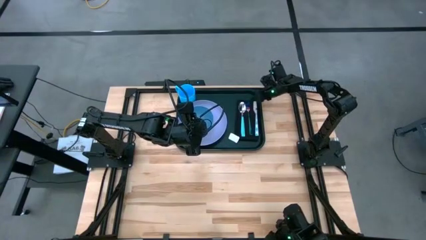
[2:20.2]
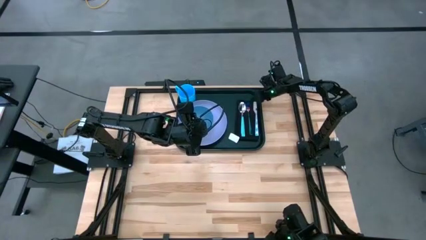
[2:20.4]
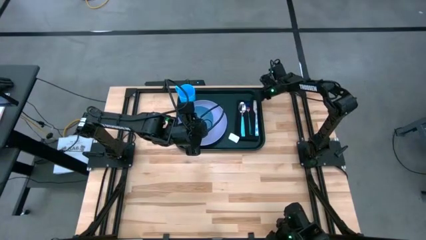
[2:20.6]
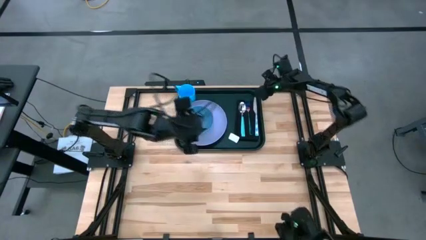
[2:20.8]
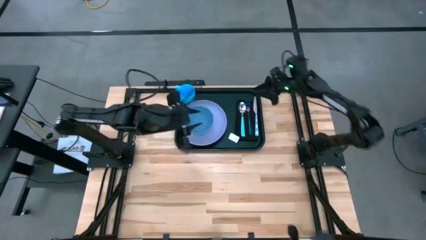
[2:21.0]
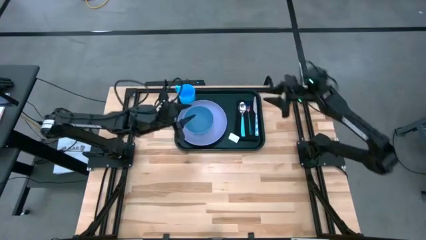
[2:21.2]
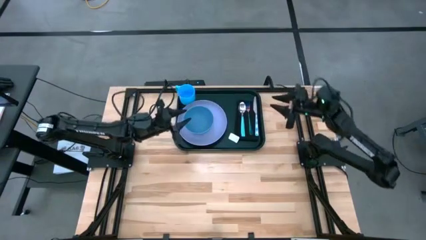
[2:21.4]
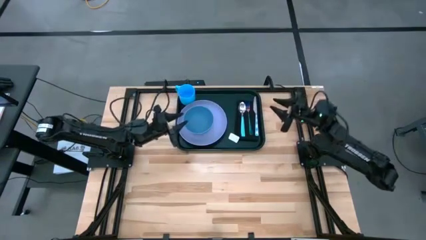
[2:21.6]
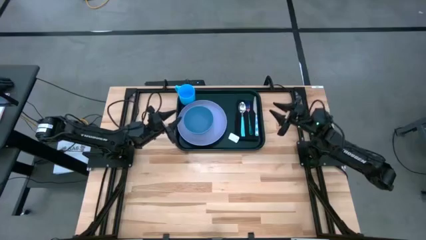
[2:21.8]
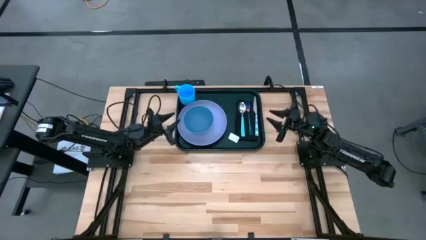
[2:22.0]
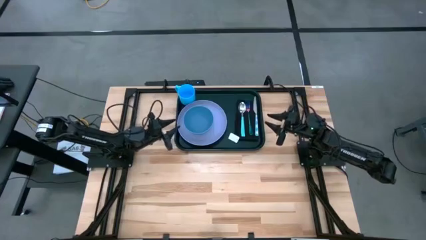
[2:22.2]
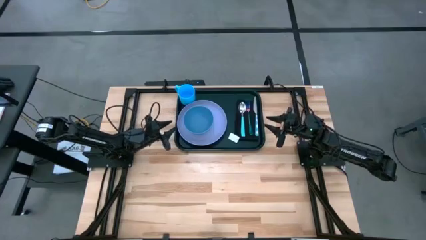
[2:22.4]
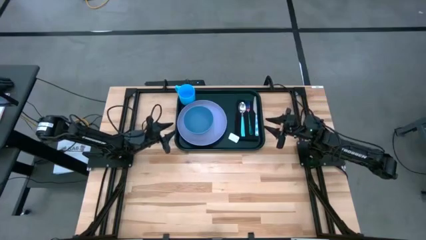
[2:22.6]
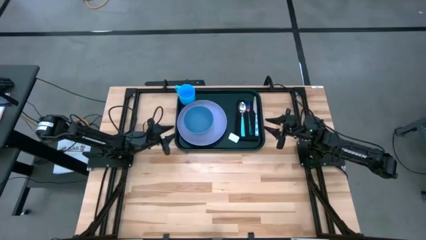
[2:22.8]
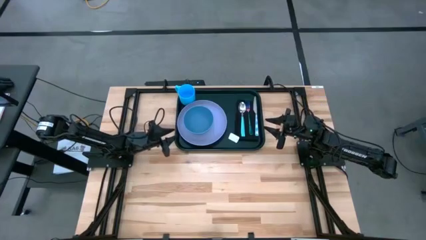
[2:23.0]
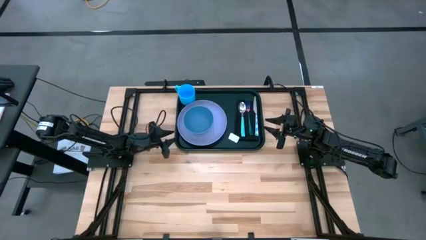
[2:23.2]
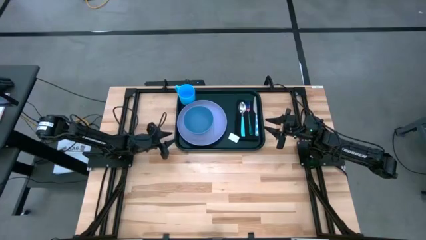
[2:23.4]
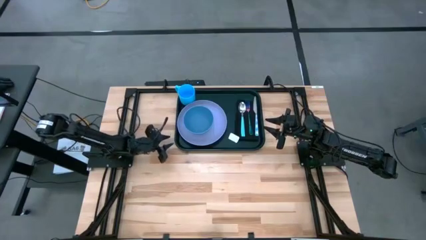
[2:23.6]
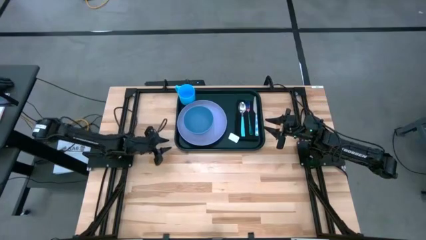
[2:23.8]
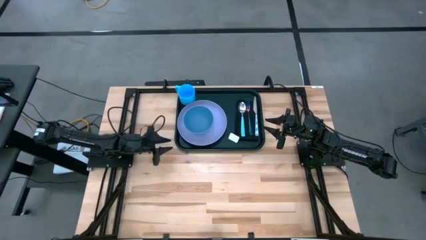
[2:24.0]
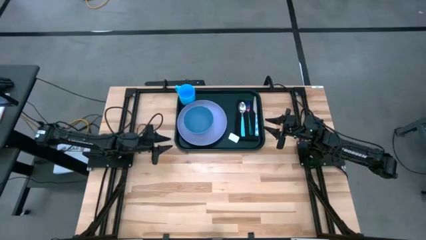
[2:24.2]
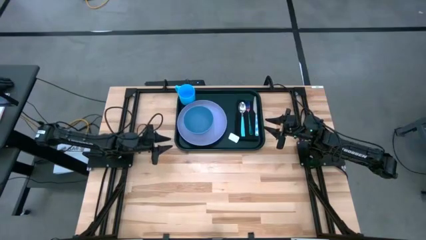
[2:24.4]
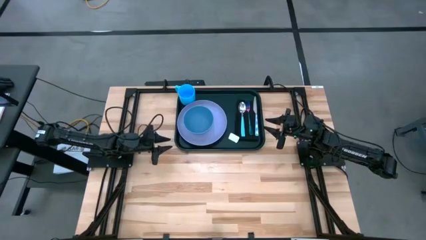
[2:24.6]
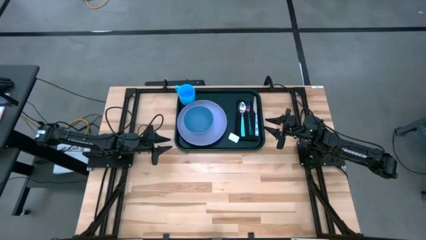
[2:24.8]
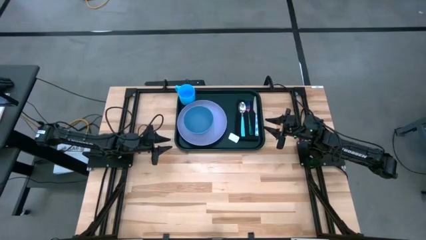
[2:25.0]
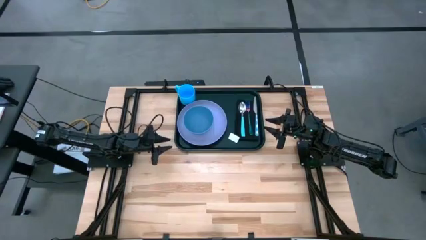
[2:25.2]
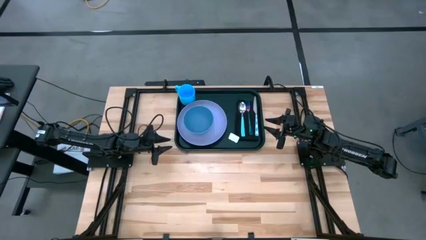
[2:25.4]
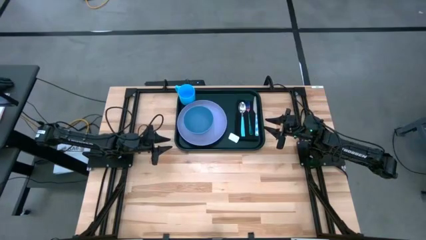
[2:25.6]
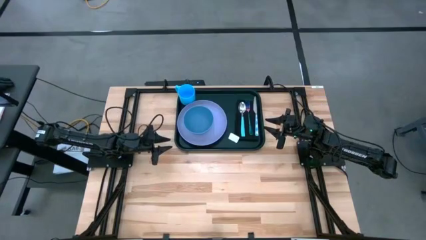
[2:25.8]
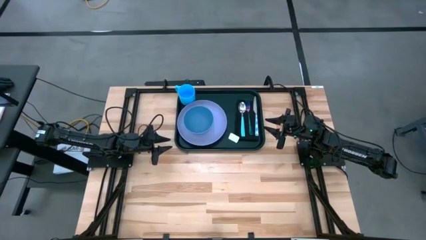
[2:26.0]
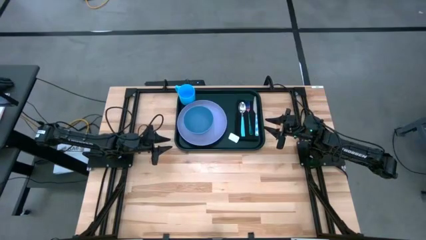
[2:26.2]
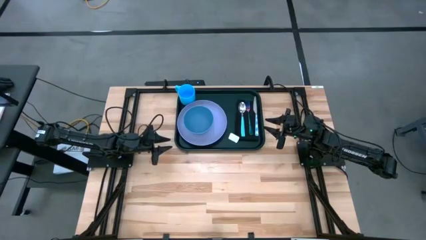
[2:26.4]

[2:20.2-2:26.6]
Task: Set up tray
Return to Home Position

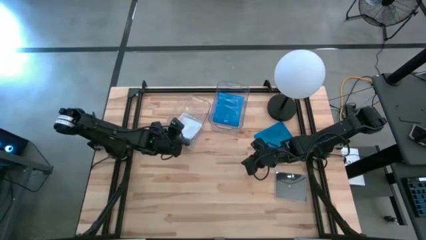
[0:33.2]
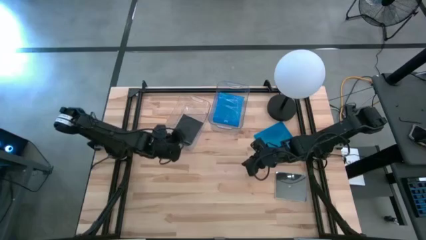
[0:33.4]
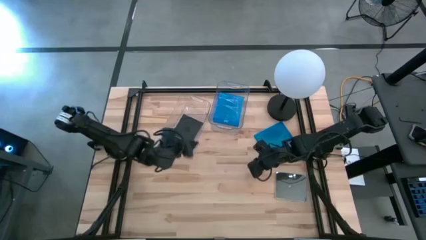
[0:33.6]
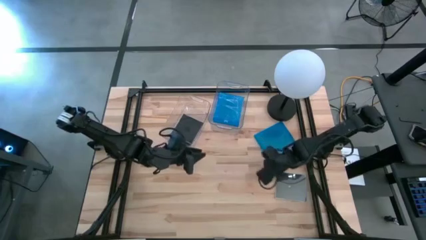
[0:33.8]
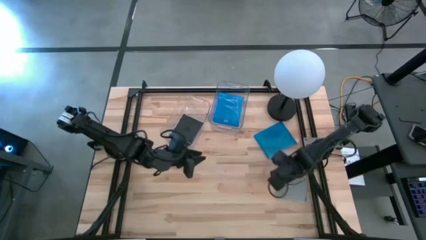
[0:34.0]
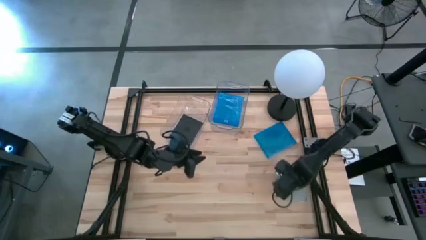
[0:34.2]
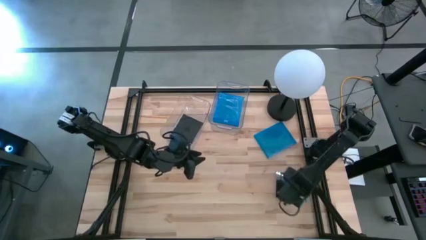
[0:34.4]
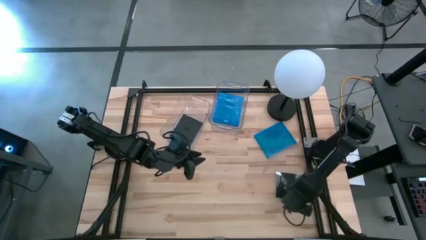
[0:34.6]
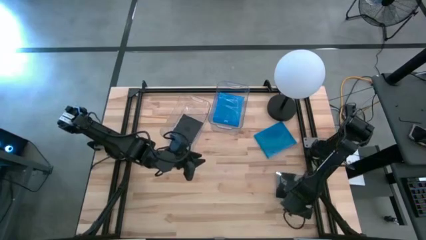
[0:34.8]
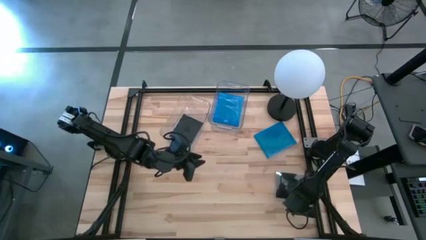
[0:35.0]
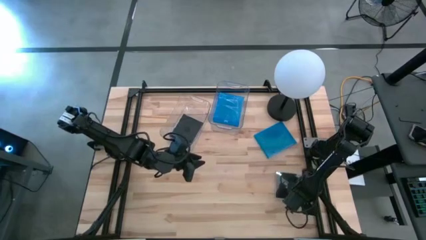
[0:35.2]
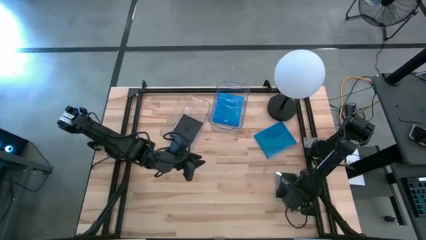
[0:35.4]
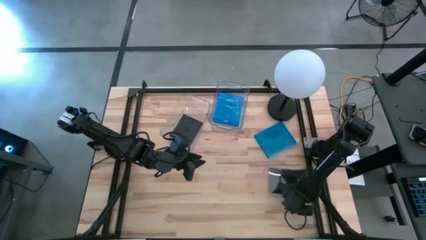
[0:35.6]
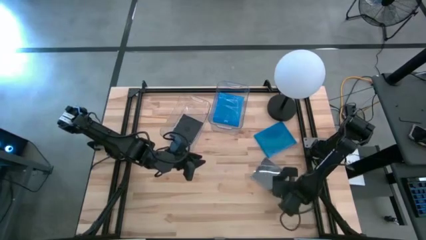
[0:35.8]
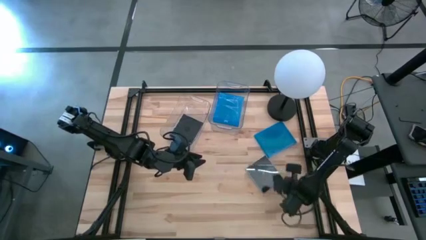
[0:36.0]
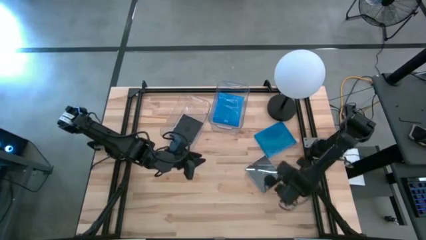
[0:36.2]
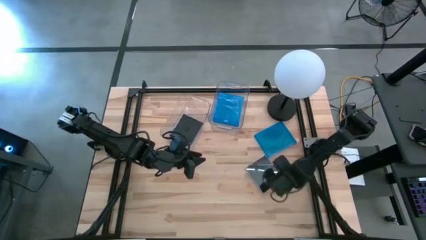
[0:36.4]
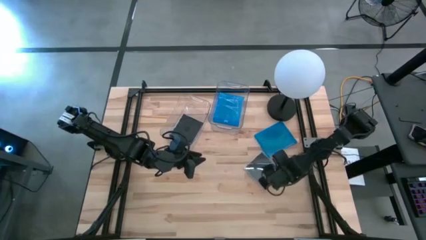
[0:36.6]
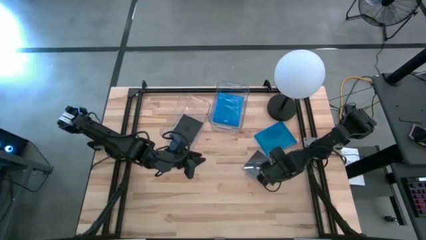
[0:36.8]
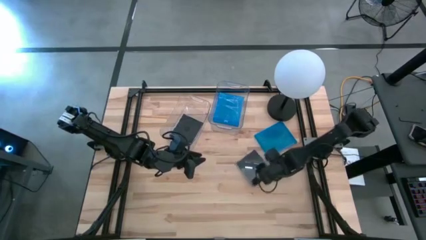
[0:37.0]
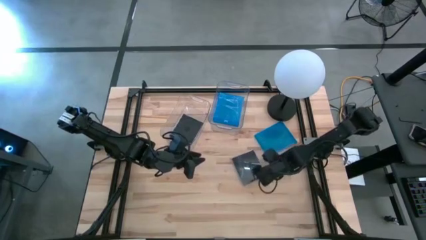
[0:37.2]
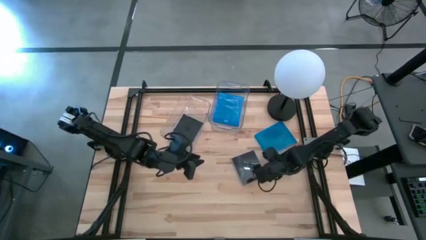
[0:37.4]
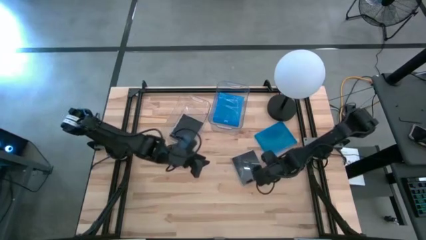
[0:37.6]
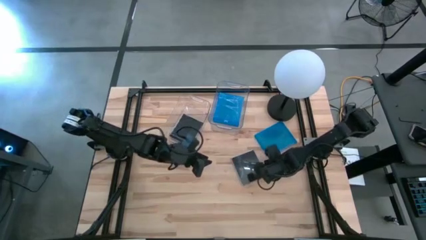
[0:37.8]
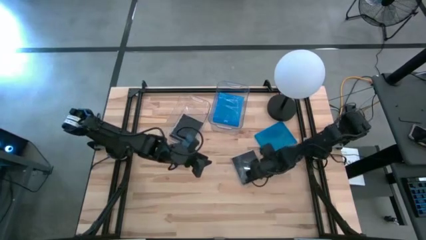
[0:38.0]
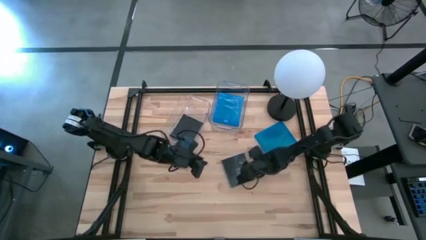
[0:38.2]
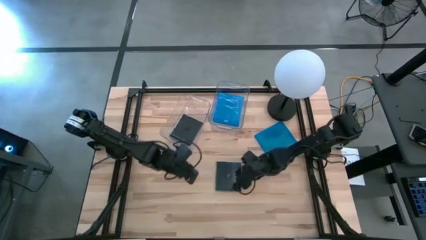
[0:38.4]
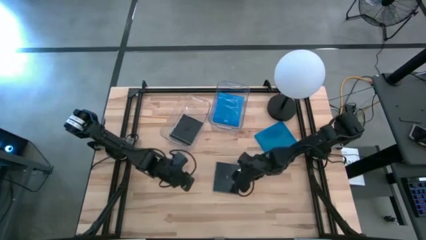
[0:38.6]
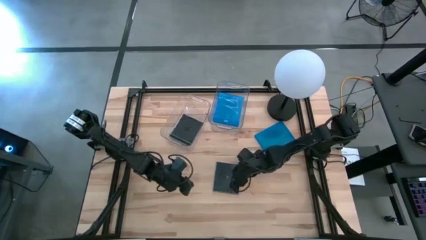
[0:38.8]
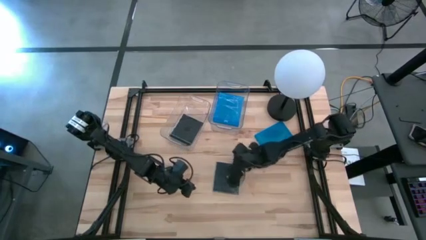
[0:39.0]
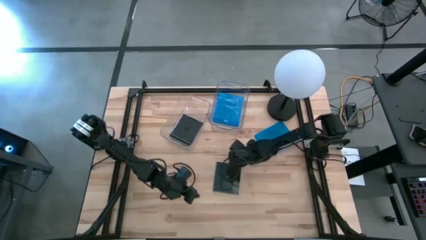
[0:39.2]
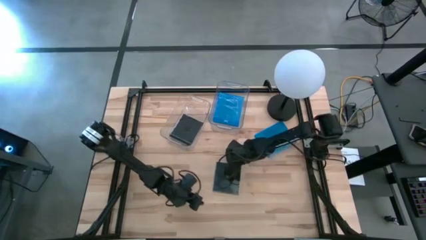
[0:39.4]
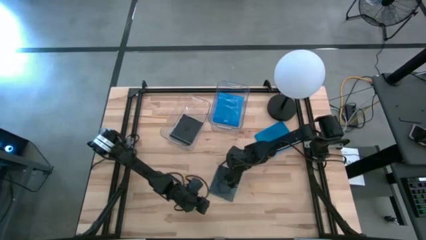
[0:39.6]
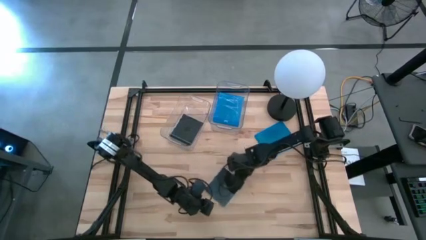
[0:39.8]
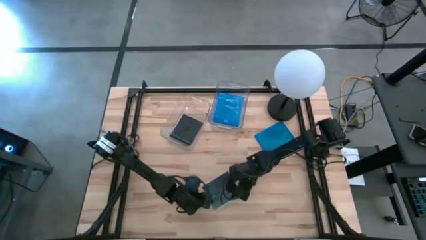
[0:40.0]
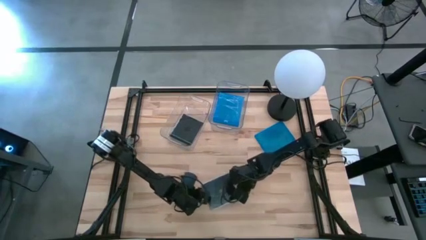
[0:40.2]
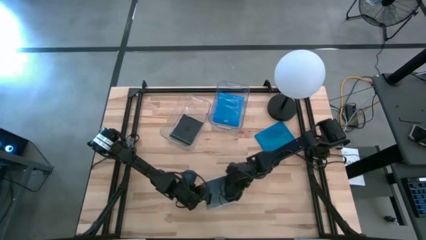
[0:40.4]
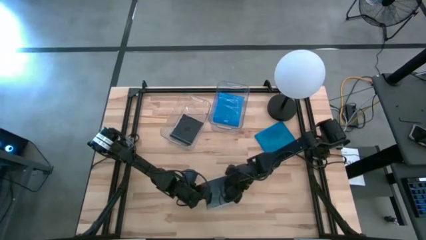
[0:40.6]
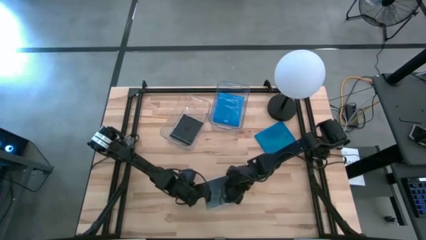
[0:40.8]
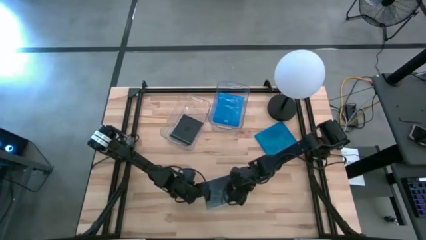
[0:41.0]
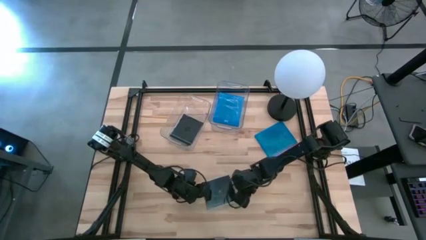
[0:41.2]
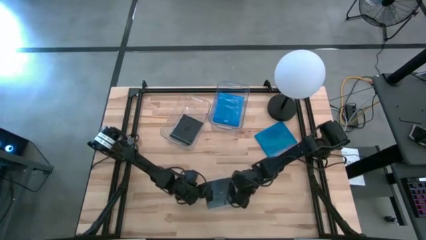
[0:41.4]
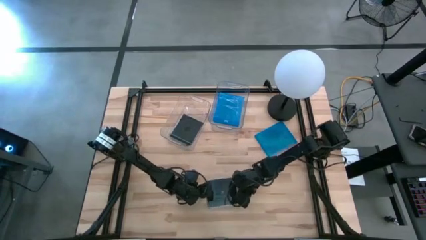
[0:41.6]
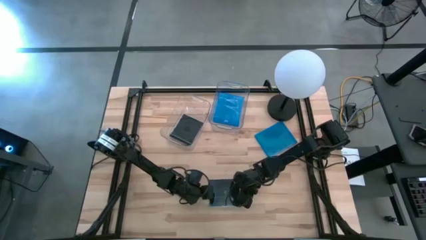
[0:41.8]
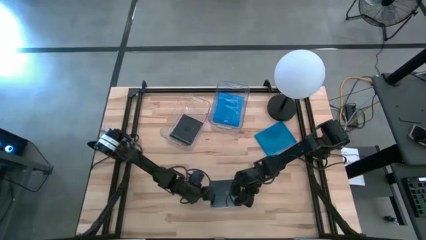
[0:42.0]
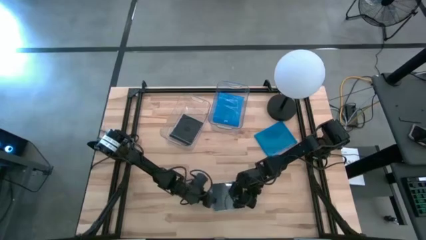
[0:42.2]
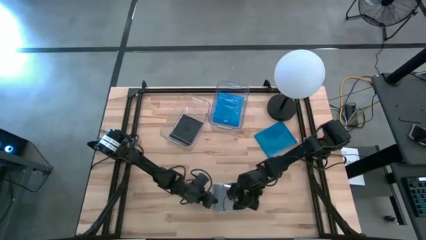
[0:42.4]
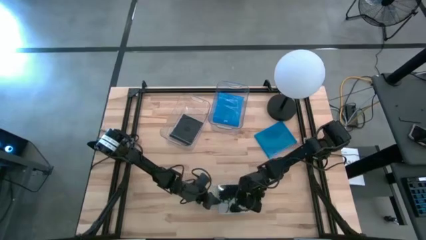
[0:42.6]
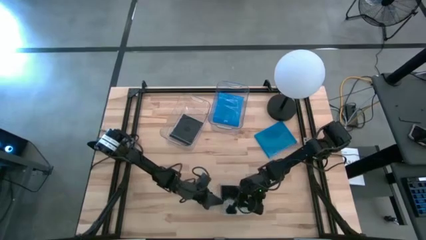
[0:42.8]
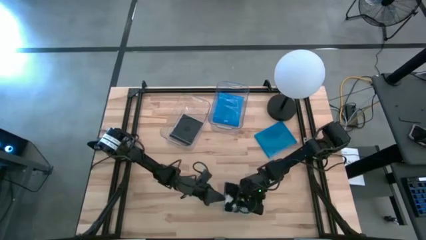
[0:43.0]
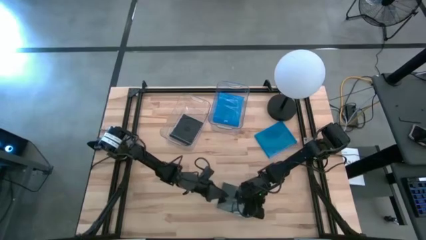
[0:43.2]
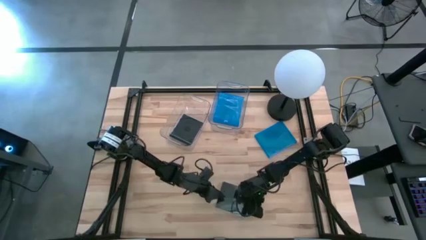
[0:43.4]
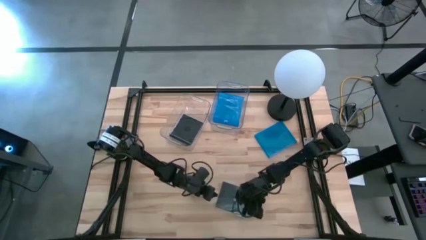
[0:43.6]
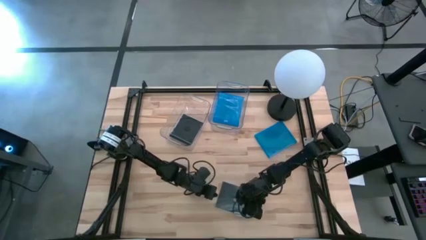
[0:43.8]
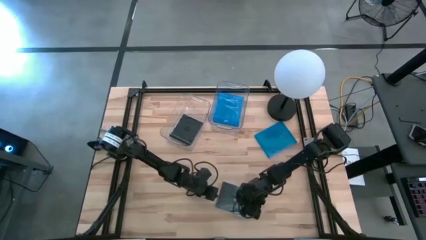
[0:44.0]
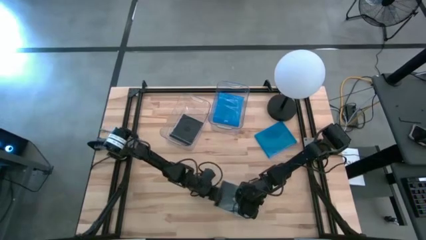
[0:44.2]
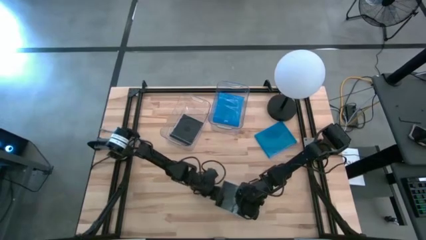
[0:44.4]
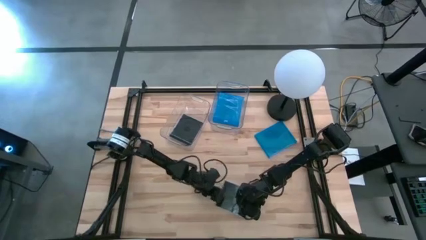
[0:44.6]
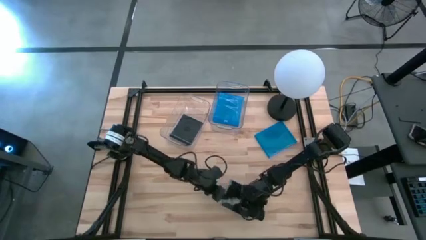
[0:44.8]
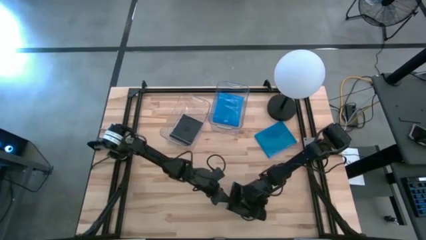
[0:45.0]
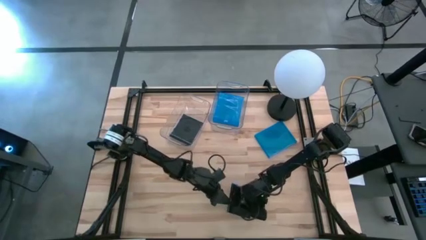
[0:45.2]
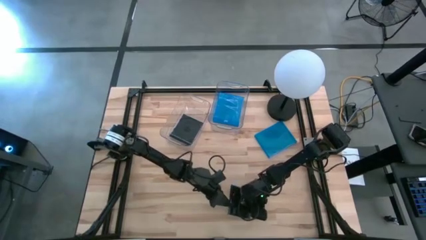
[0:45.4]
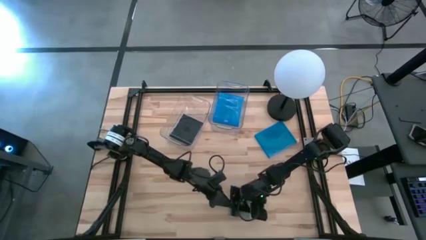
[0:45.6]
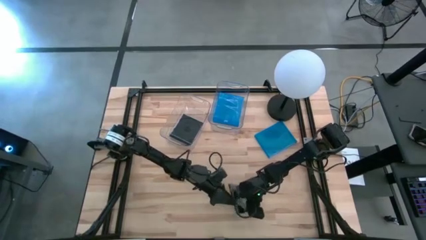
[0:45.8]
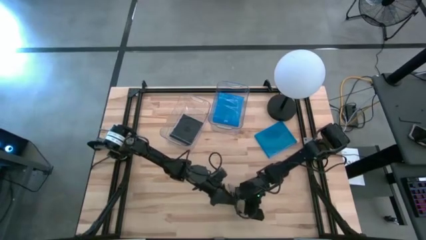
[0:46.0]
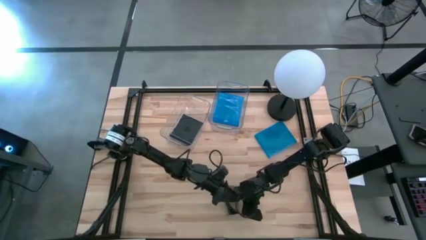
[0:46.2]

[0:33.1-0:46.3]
Task: Pick & place jewel cases by type
Put the black cd case into the left transparent bin
